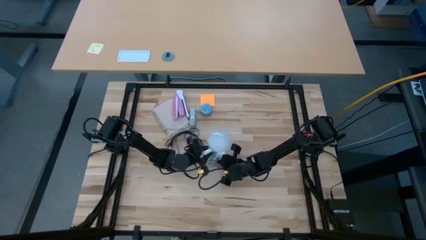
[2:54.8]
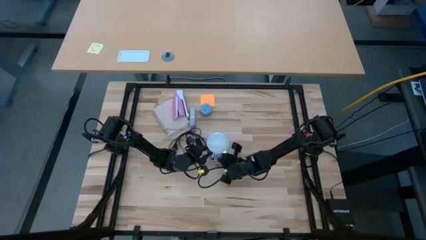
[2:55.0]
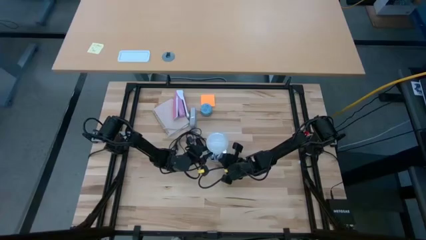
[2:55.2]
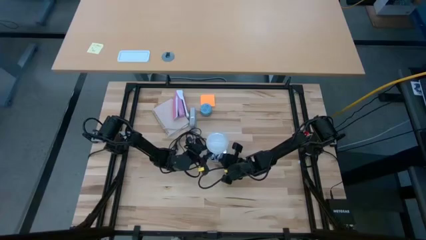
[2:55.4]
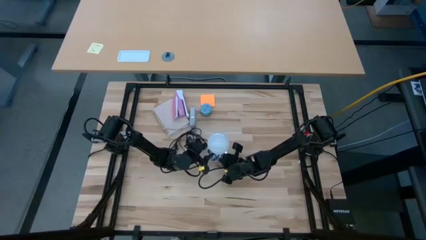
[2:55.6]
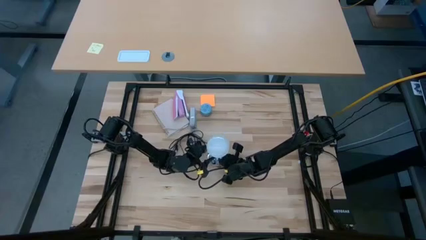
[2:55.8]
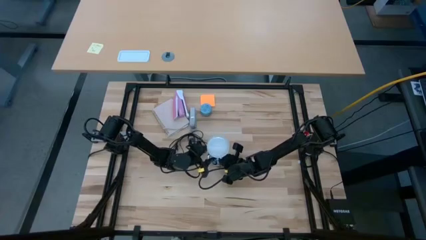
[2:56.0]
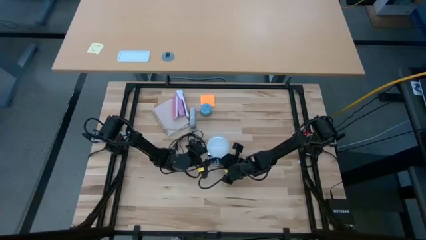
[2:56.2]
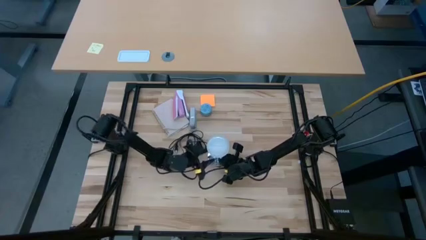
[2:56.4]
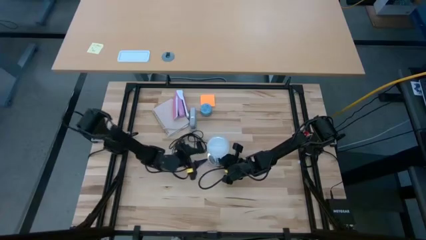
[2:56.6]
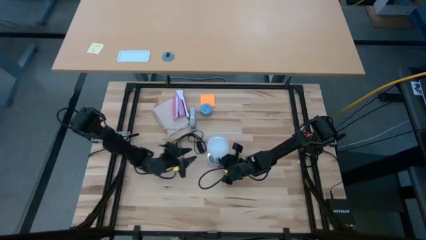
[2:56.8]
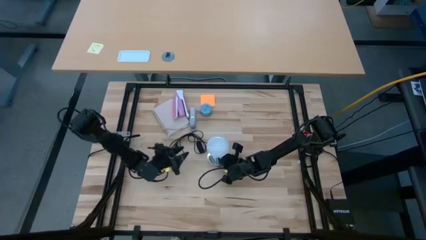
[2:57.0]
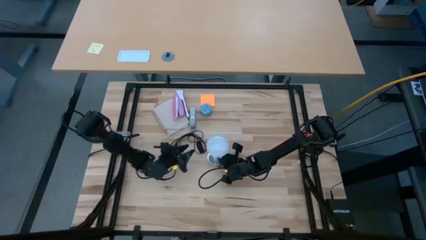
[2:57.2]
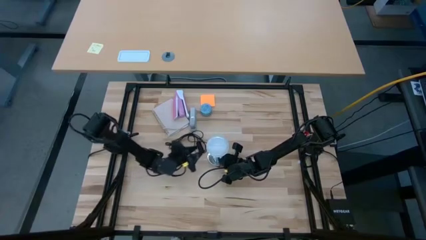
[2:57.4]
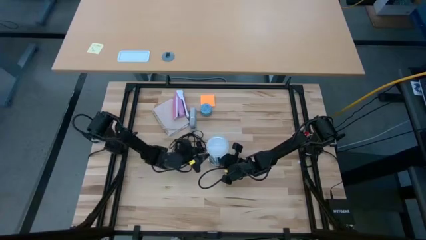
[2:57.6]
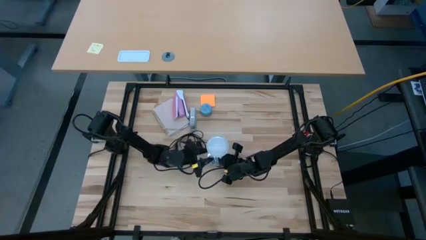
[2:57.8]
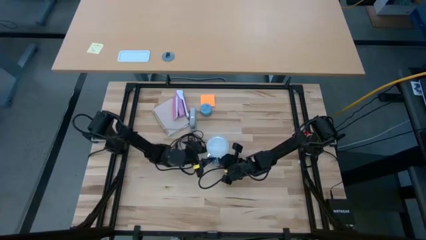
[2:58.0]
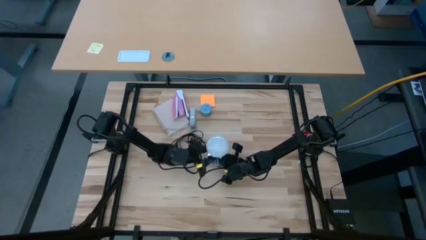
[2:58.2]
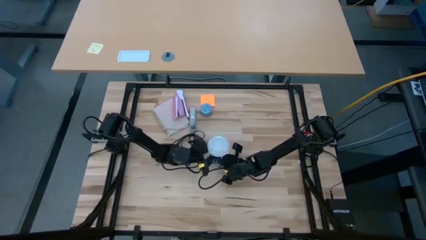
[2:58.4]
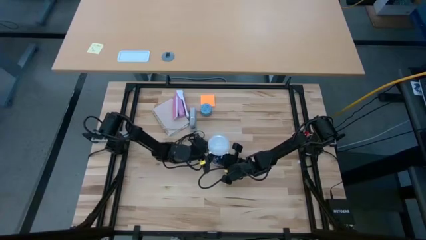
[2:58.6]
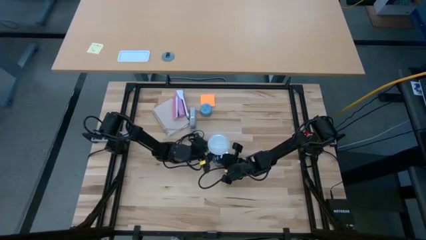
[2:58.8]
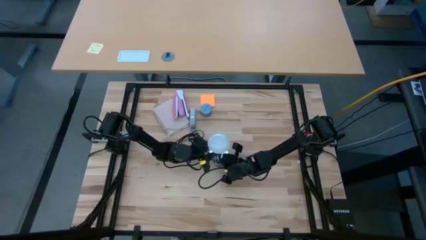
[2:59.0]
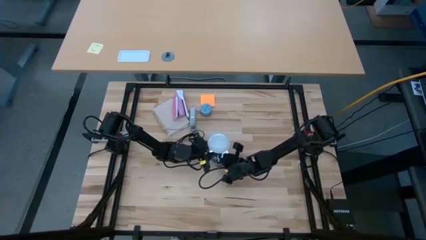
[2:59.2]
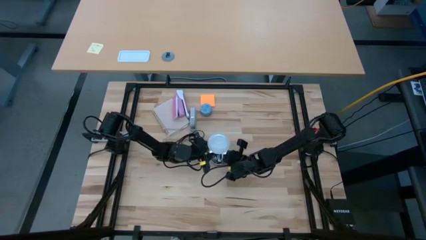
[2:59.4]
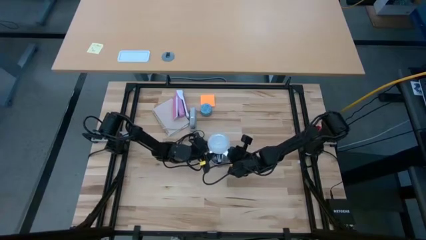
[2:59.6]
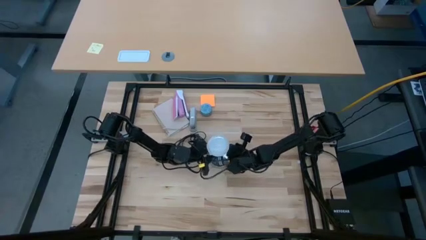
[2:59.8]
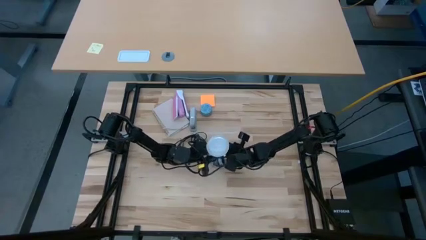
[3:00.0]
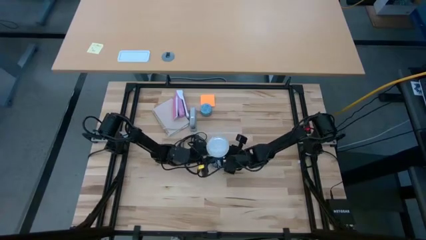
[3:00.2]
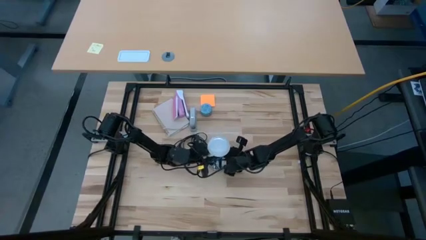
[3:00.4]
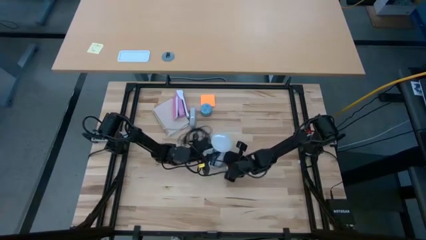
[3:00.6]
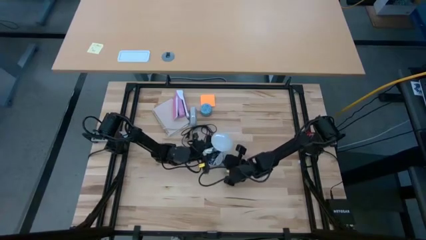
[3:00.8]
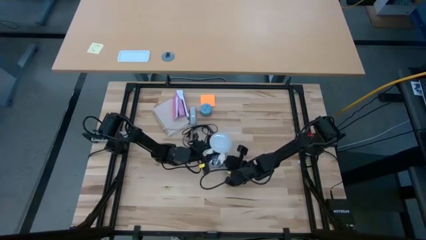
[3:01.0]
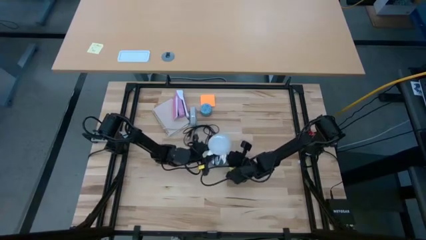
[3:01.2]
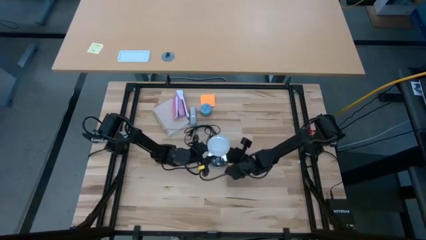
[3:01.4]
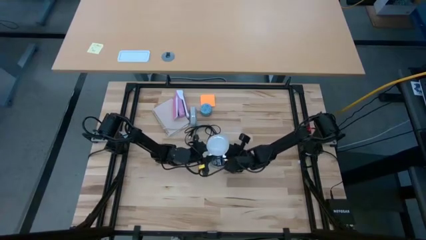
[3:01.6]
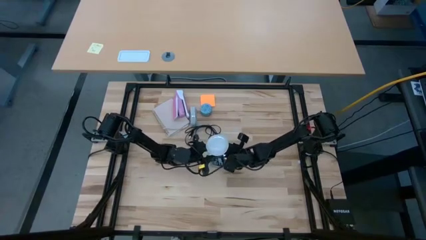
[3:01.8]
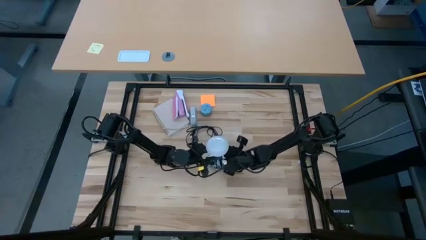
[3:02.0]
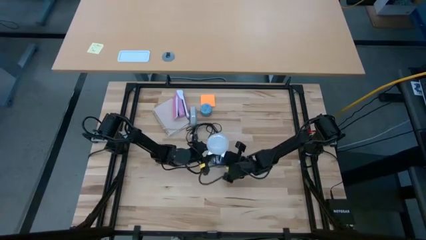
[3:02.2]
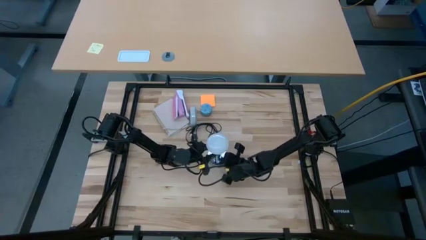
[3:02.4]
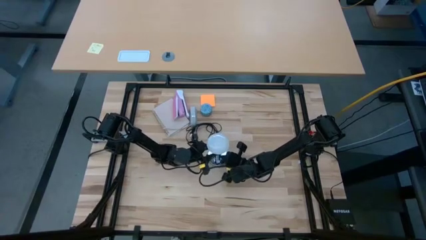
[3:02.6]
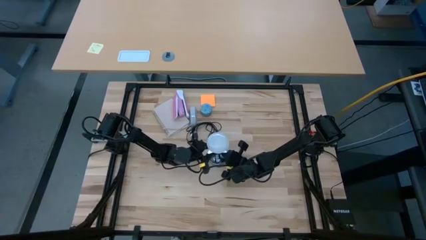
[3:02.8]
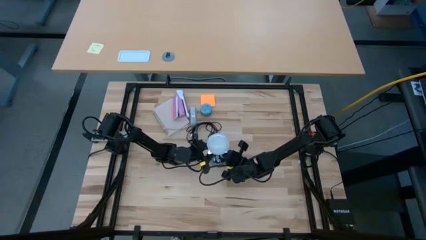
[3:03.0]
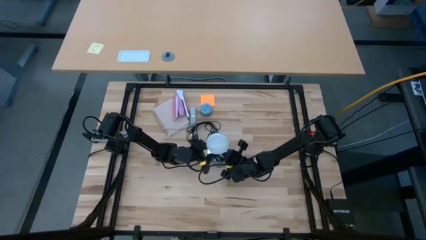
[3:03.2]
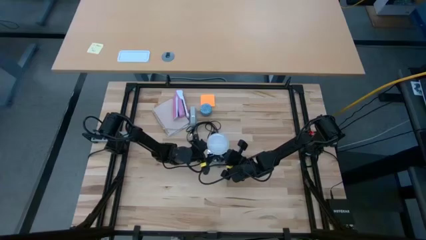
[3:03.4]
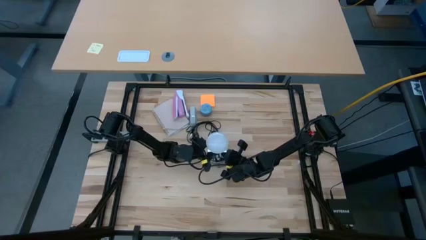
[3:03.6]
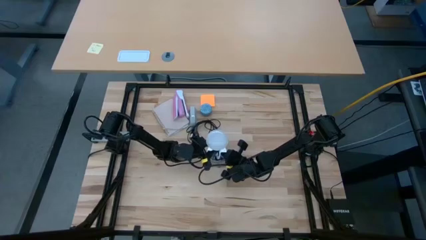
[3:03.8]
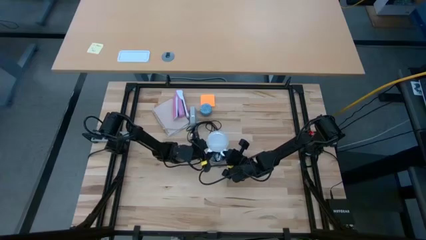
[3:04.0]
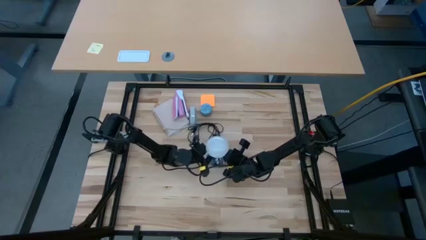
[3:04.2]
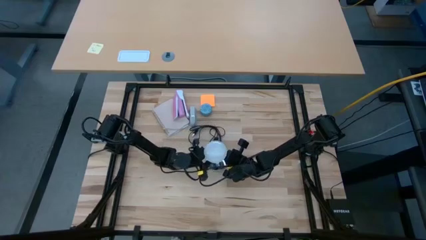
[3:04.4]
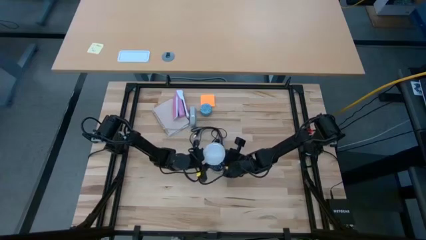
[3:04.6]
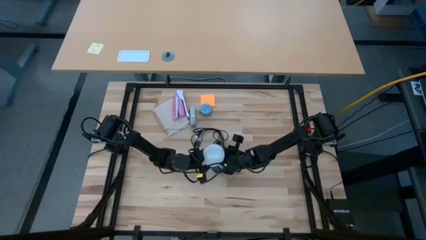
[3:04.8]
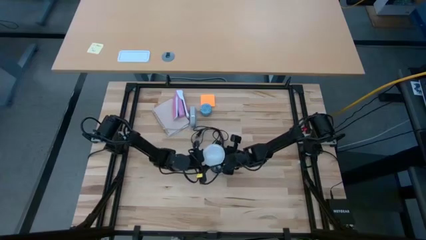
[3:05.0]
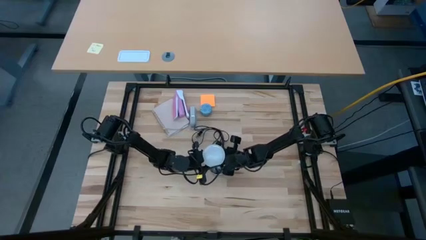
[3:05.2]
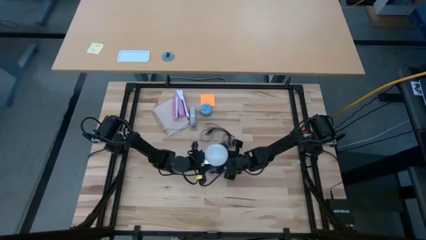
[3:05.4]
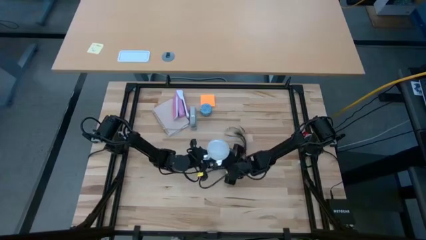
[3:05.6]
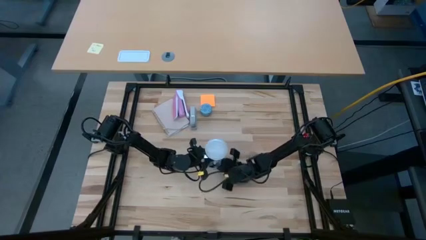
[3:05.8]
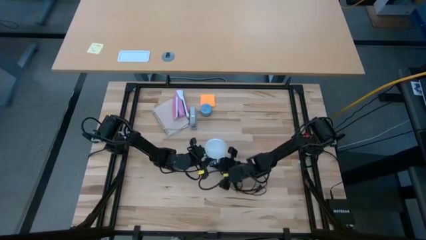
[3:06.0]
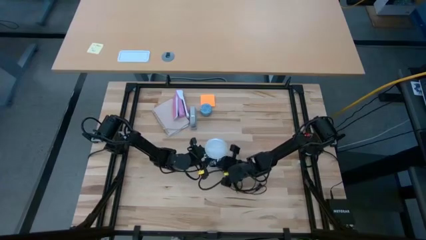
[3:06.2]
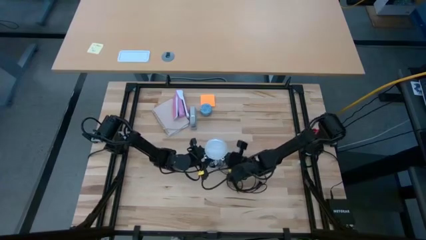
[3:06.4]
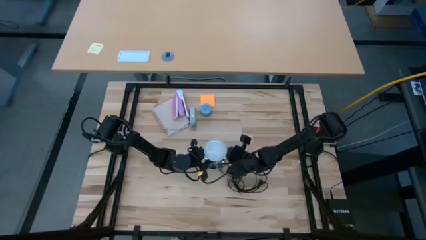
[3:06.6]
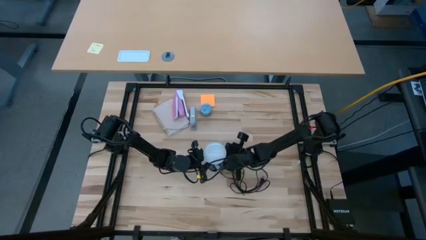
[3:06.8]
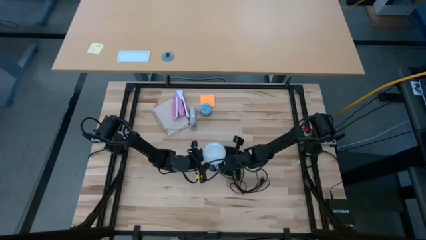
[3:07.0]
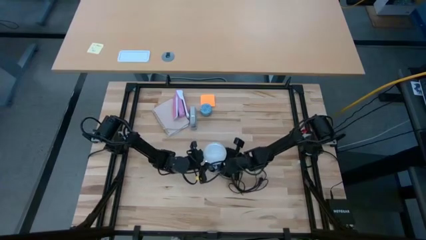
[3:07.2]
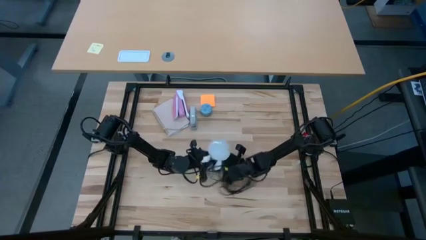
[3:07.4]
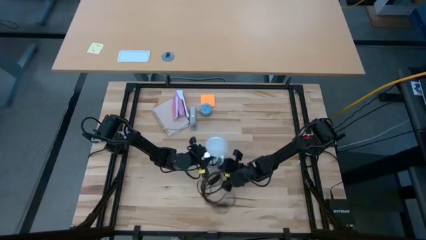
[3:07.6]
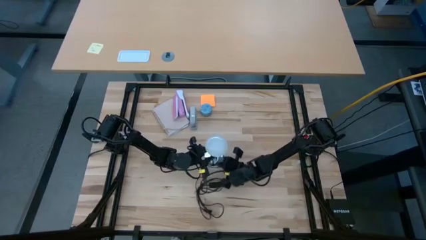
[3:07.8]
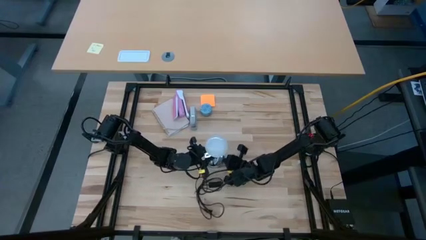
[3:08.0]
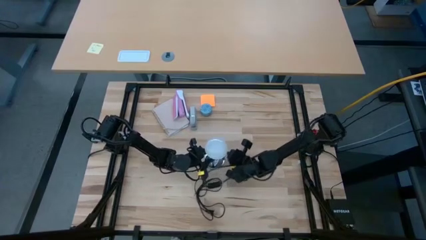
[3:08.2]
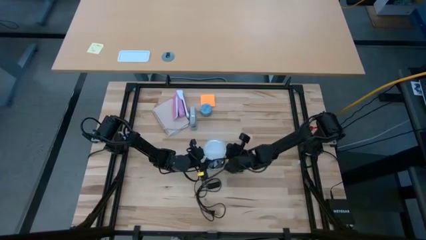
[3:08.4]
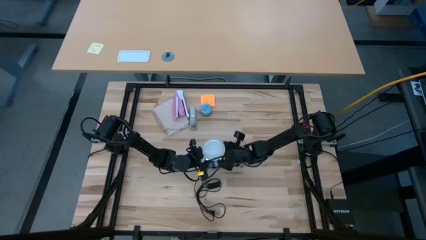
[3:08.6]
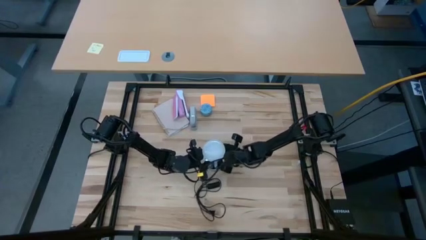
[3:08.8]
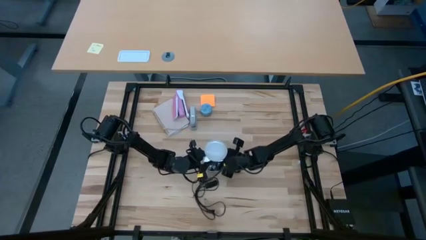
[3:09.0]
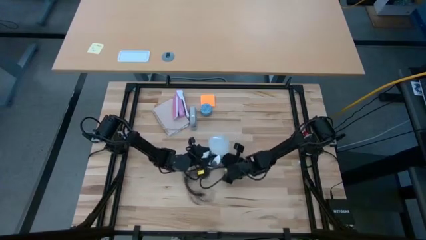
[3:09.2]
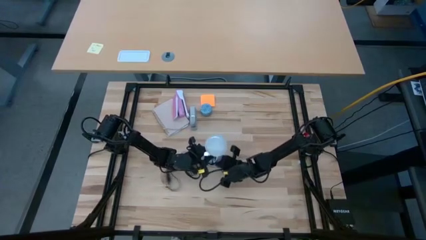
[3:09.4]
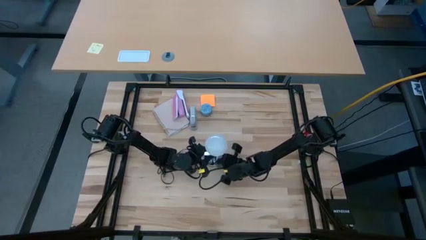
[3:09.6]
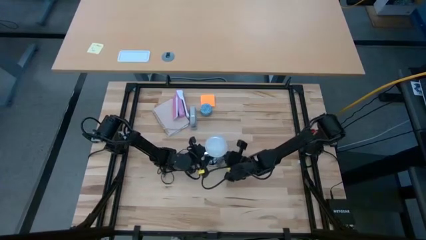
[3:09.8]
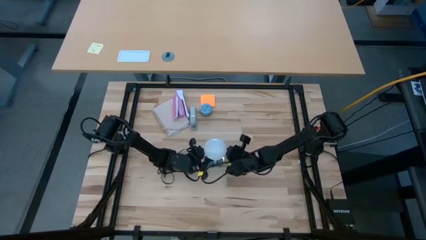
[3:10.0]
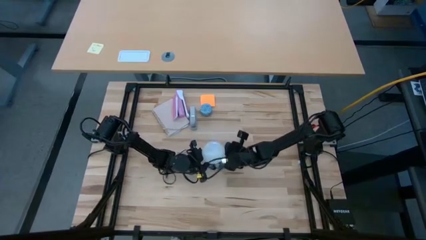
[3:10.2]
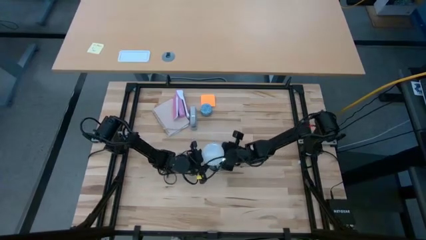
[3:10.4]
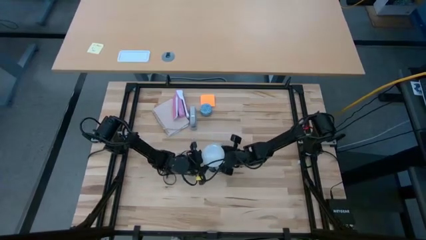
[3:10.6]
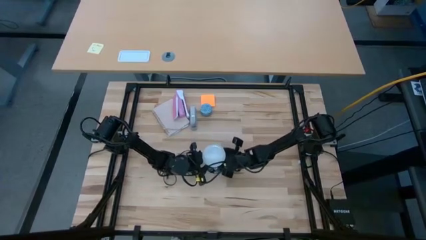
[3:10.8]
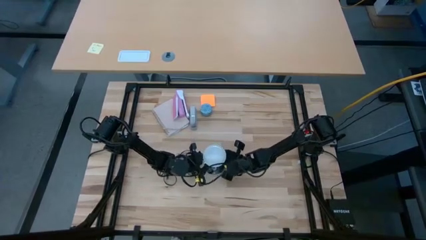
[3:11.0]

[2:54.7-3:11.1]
Task: Screw lightbulb
Remove the white lightbulb from the silver lamp
